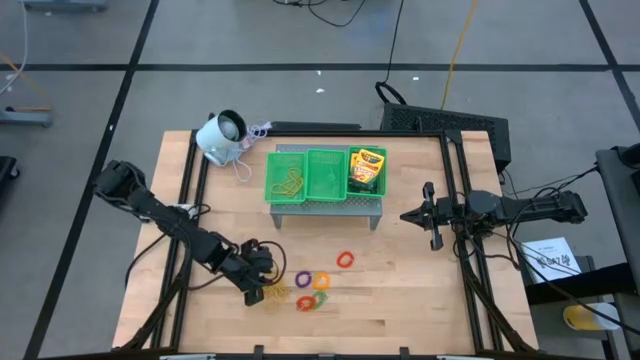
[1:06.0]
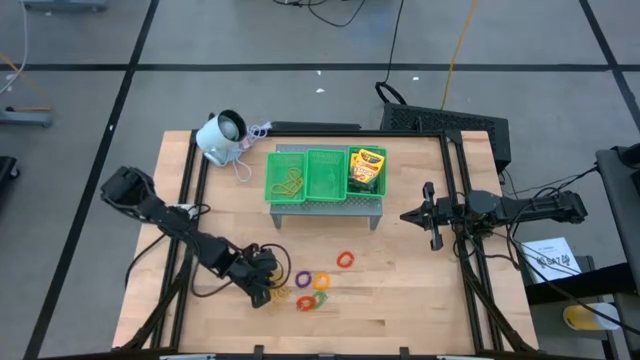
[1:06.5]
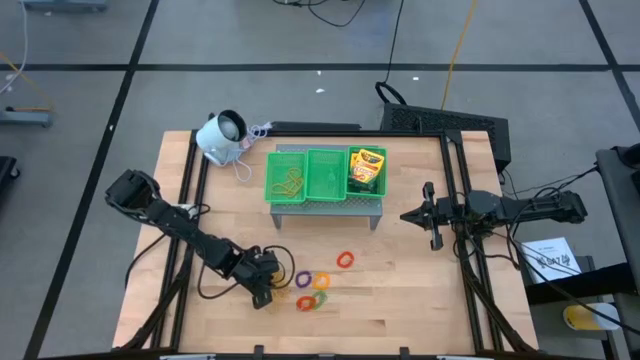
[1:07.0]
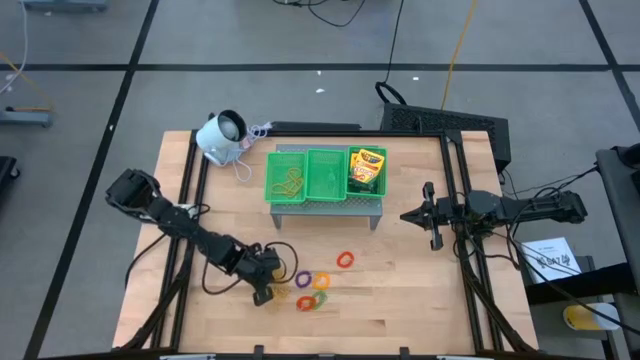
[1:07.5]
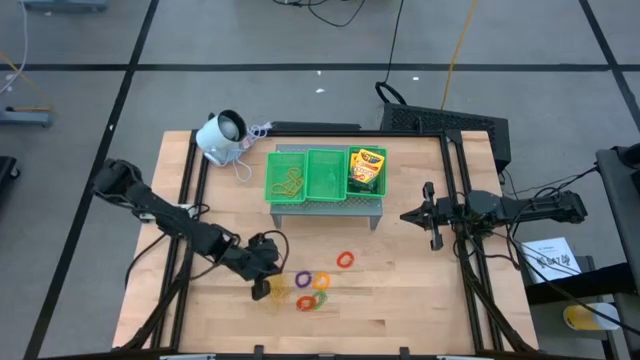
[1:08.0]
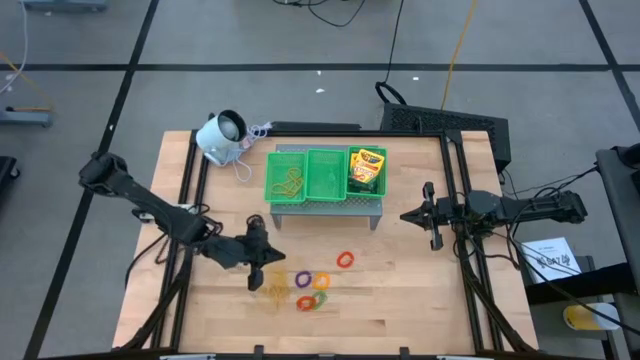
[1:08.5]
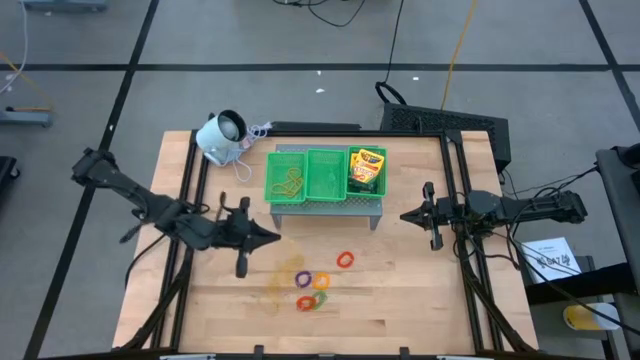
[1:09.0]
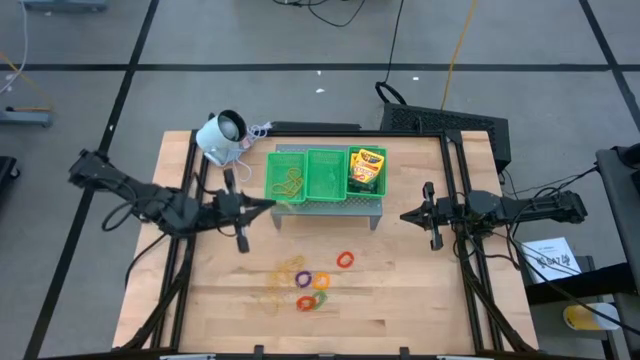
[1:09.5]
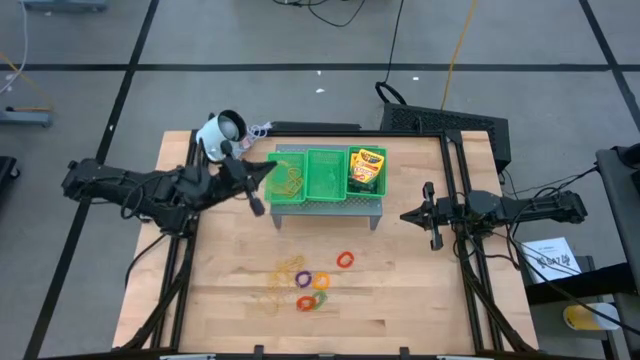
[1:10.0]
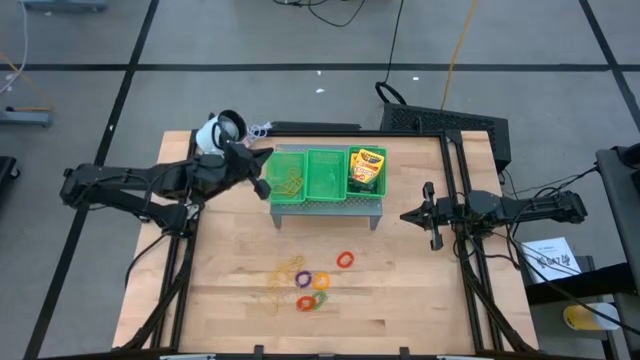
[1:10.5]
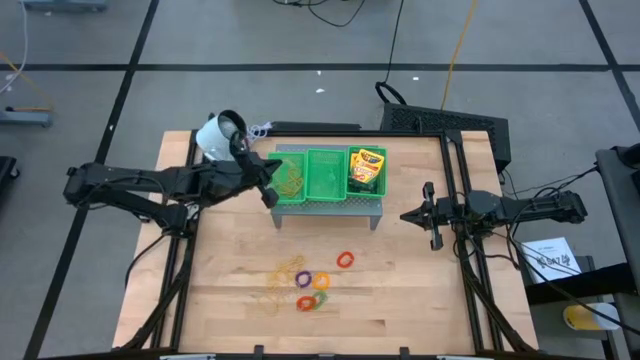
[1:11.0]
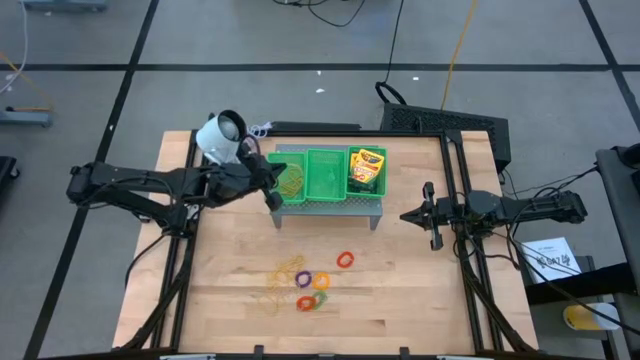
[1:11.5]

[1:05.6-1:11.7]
Task: Pick & Place Office Desk Supplies
Put the yellow rubber band into the left green basket

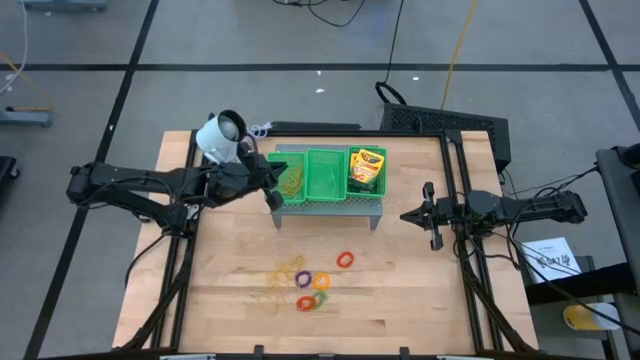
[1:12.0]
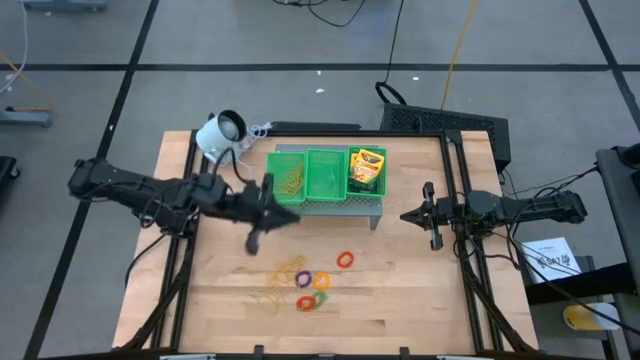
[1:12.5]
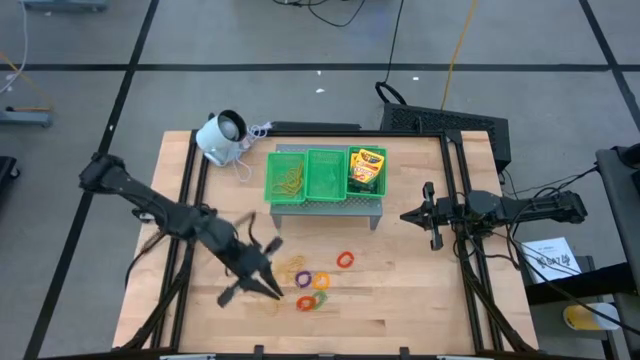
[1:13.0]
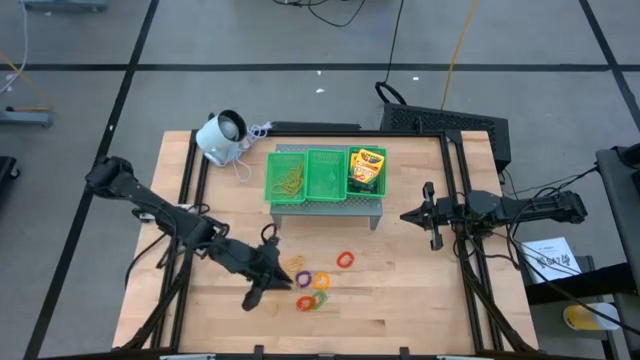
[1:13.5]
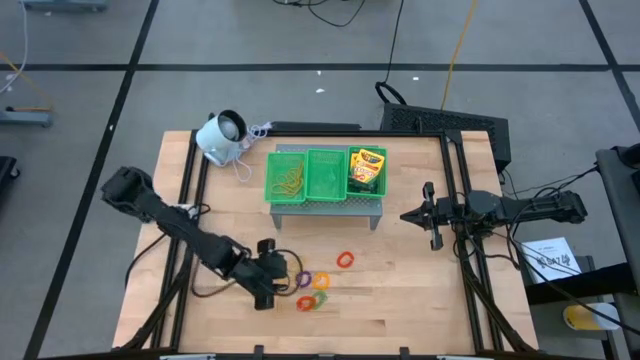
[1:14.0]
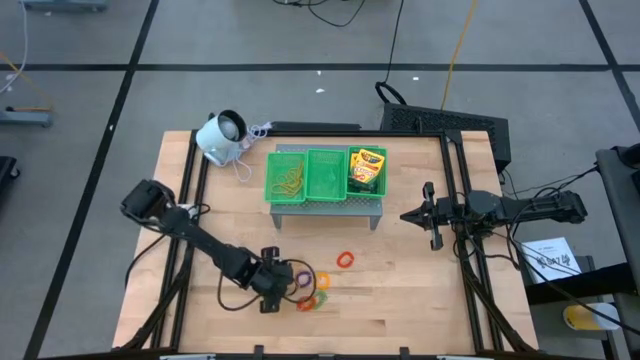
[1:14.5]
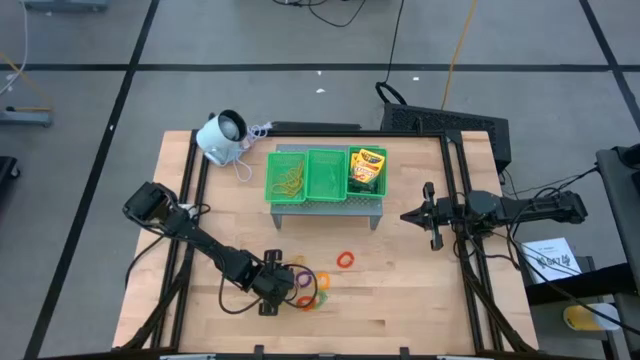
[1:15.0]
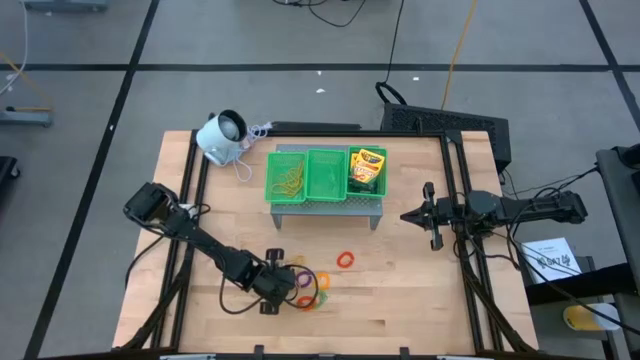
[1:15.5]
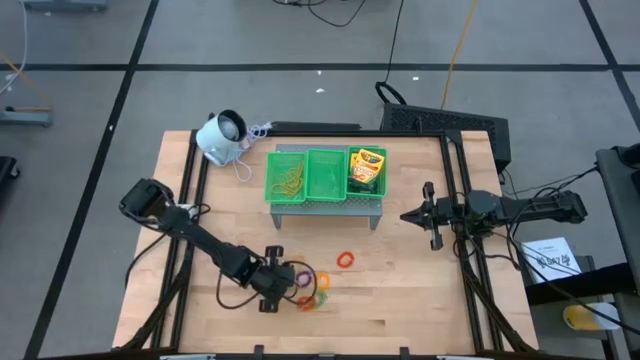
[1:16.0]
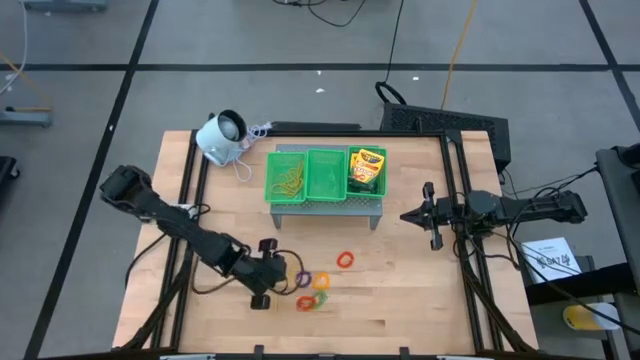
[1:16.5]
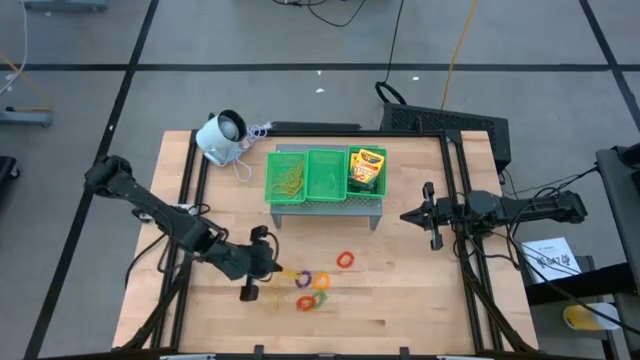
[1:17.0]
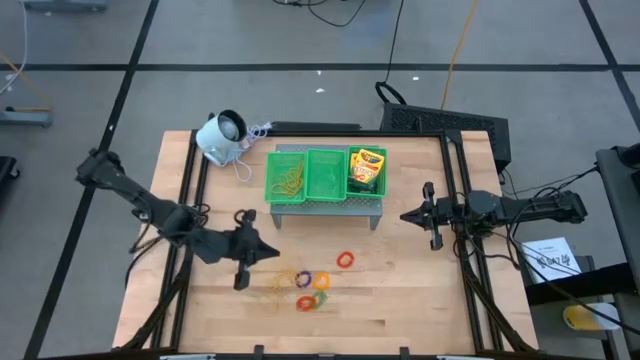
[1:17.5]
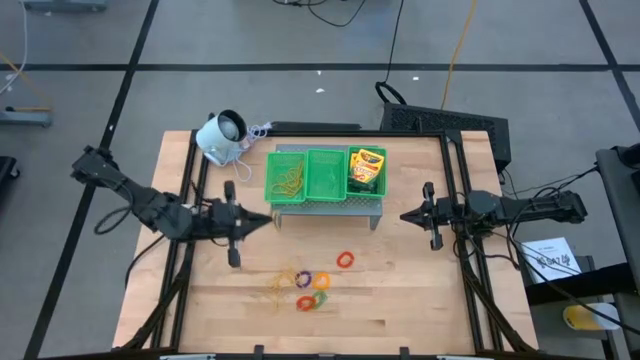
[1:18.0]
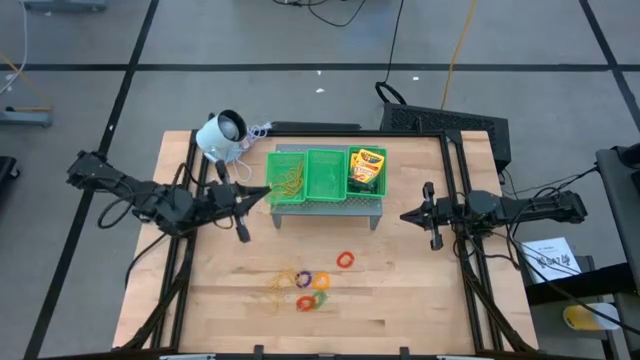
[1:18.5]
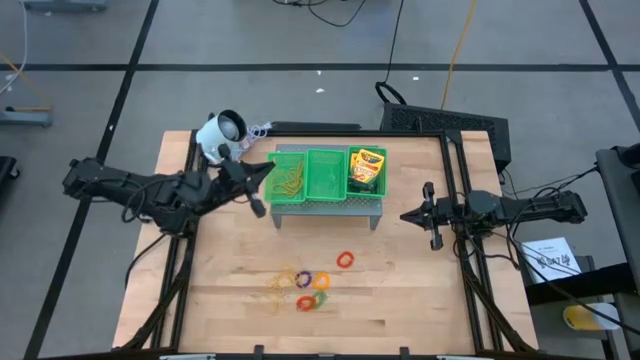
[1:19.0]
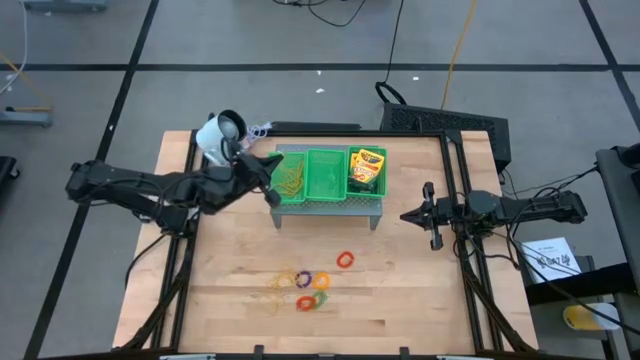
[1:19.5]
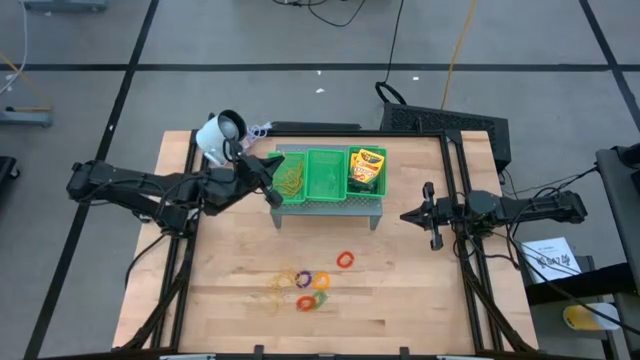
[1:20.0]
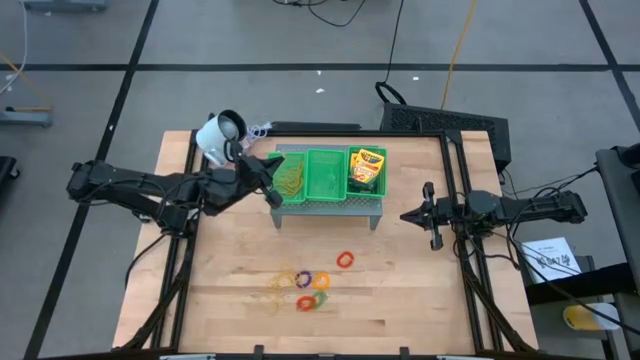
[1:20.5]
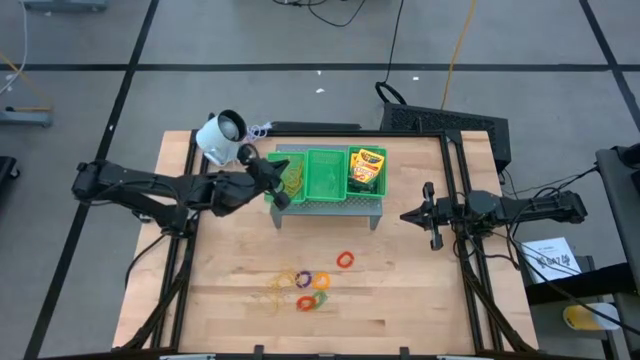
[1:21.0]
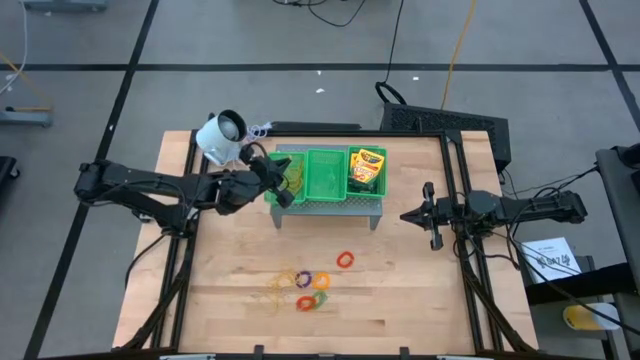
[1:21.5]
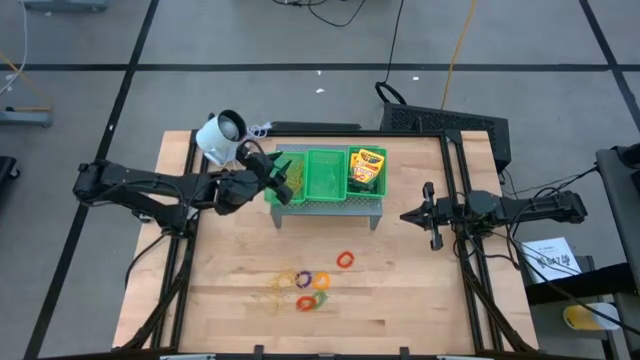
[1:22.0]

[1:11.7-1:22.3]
Put the yellow rubber band into the left green basket

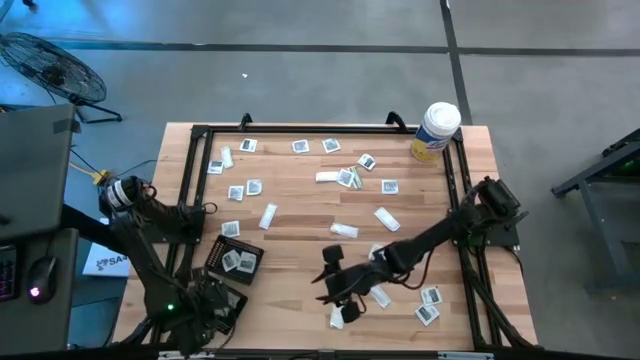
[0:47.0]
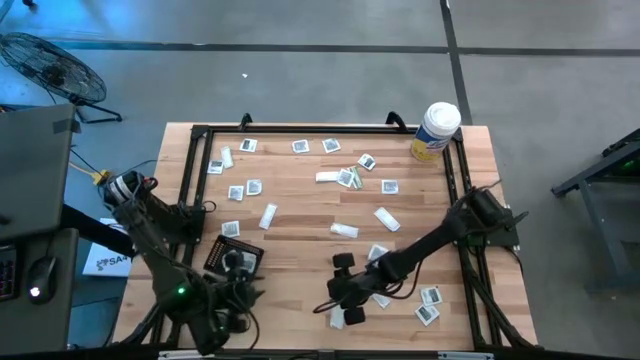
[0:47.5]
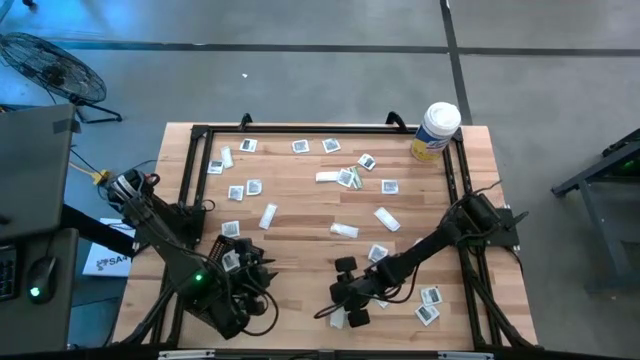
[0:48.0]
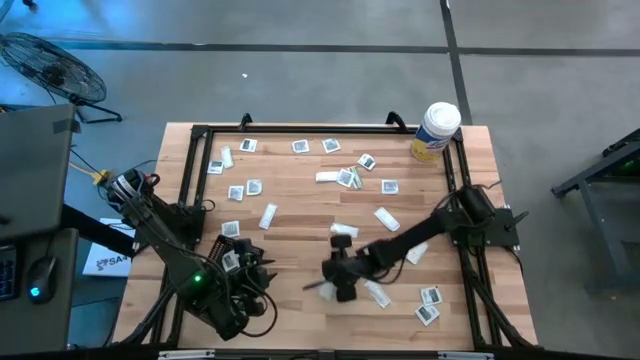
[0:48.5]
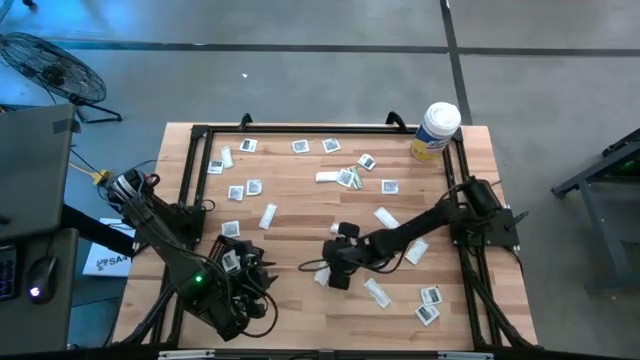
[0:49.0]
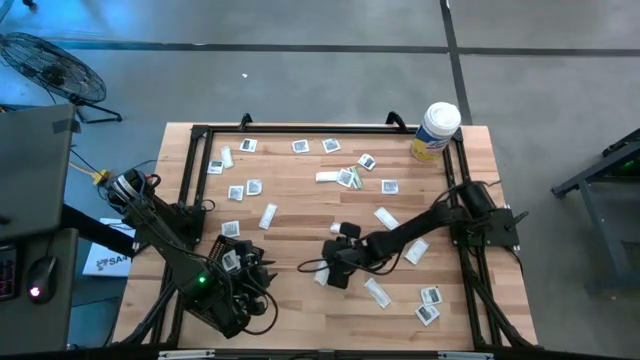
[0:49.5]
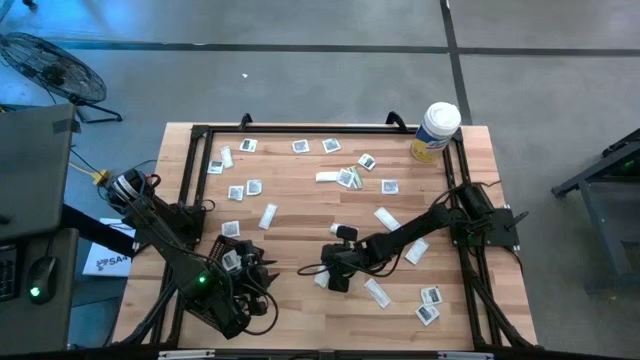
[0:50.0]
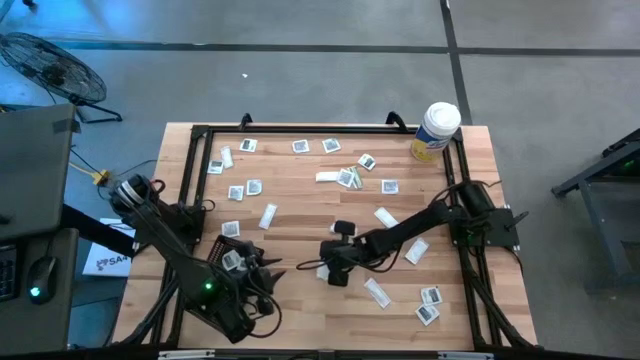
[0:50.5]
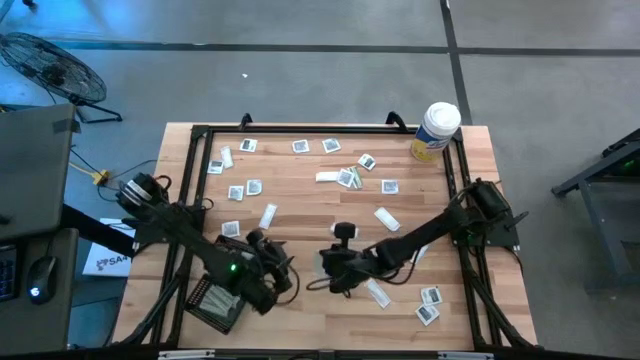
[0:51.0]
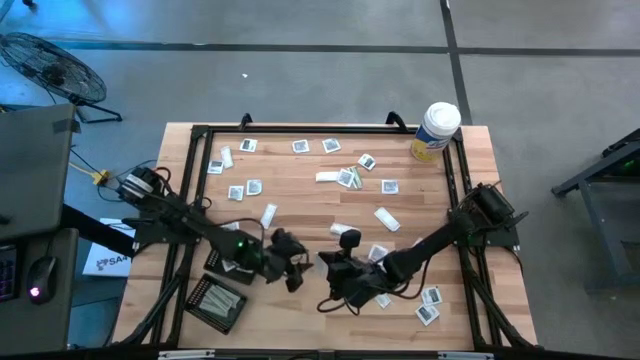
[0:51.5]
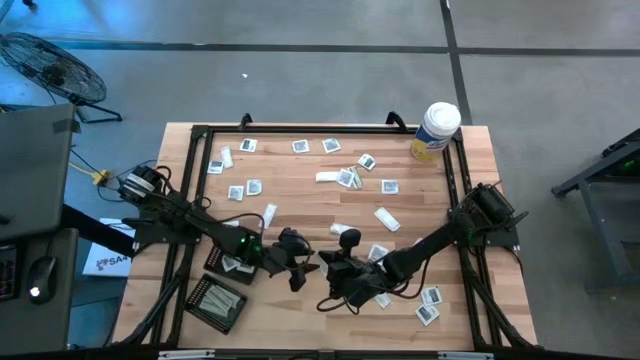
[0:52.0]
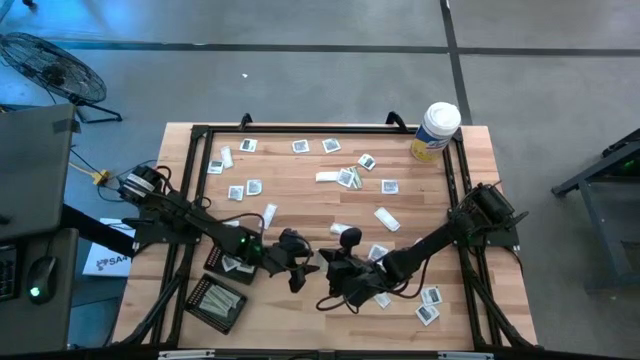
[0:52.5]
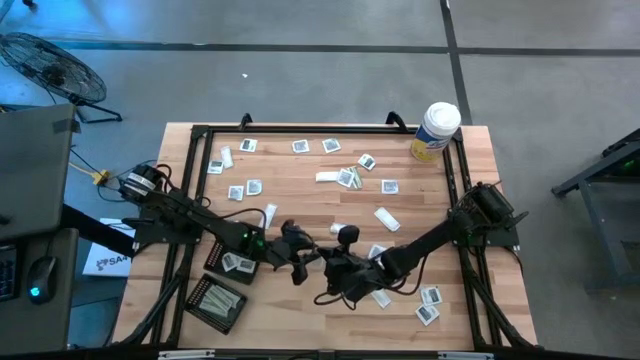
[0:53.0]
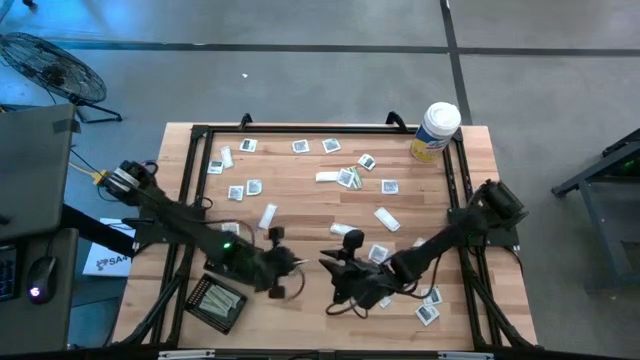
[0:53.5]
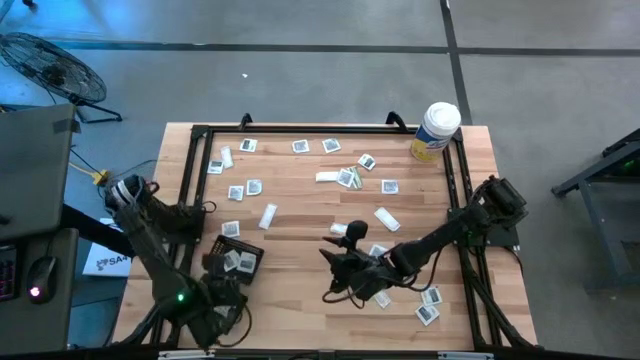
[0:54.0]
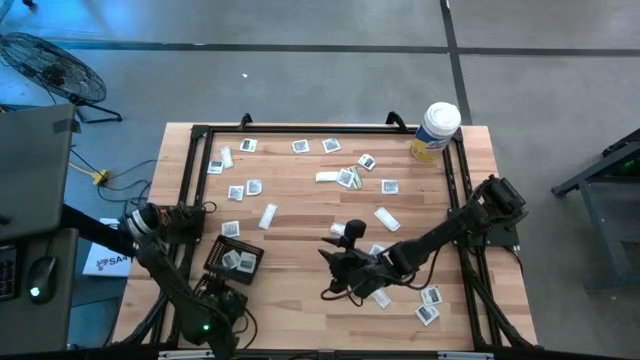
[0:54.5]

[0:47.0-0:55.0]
Task: Pick & Place First Aid Supplies
Put the bandage into the bottom black bin
